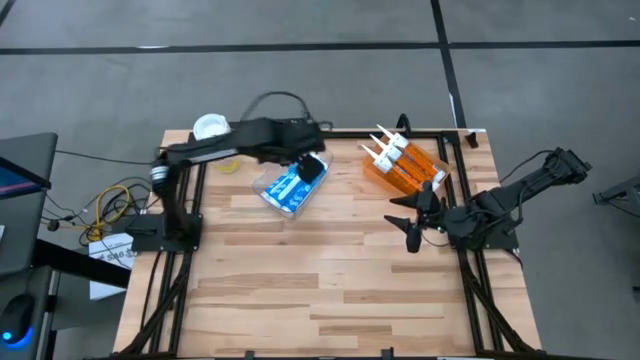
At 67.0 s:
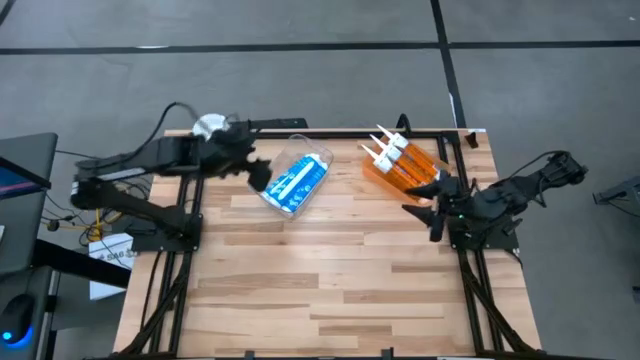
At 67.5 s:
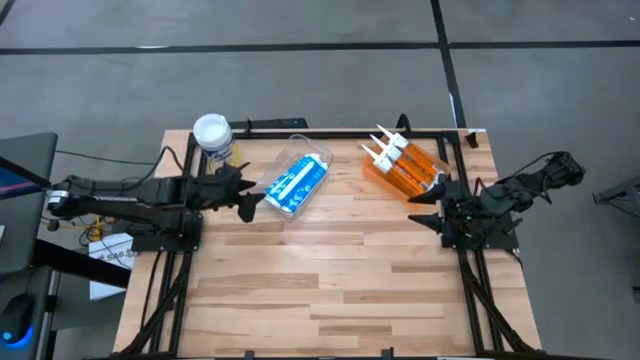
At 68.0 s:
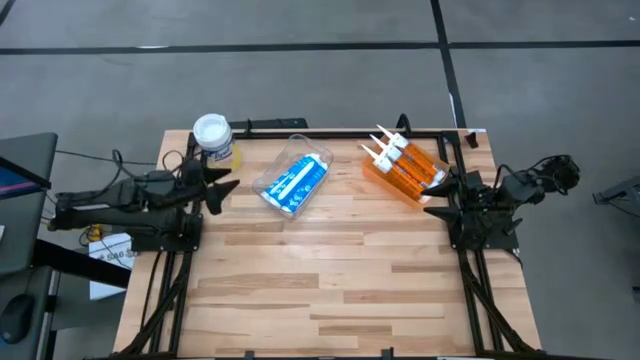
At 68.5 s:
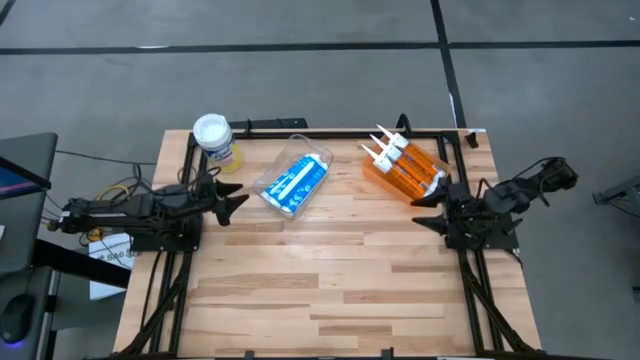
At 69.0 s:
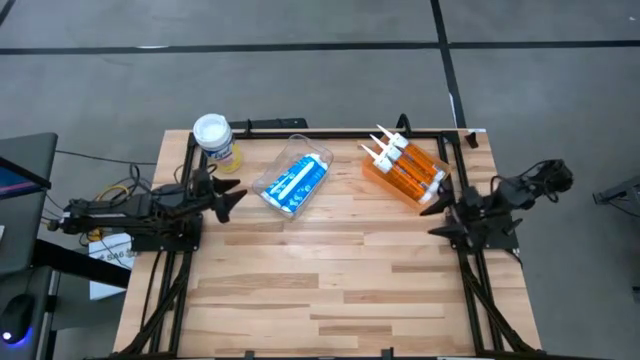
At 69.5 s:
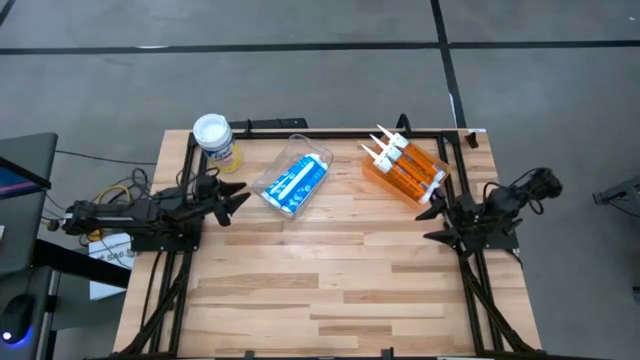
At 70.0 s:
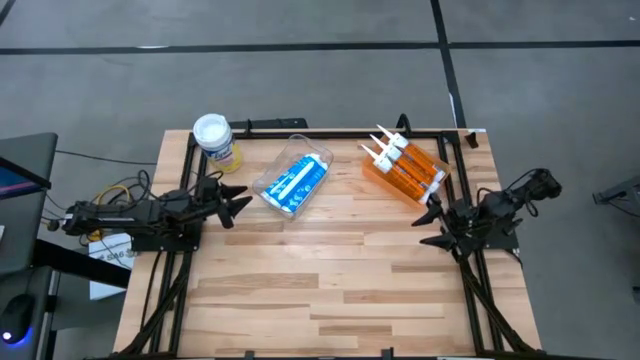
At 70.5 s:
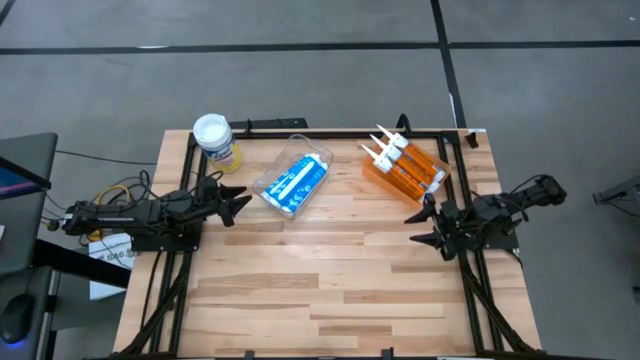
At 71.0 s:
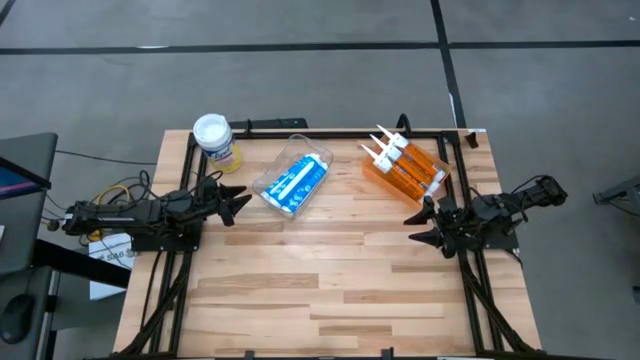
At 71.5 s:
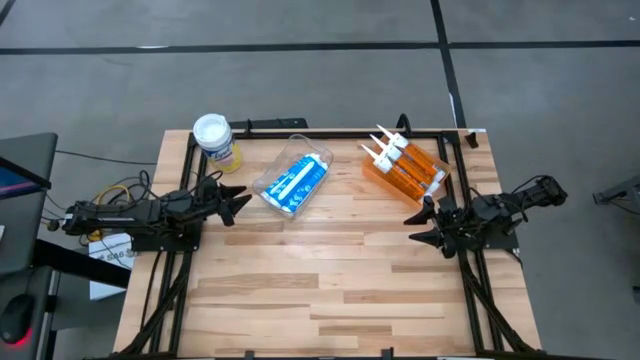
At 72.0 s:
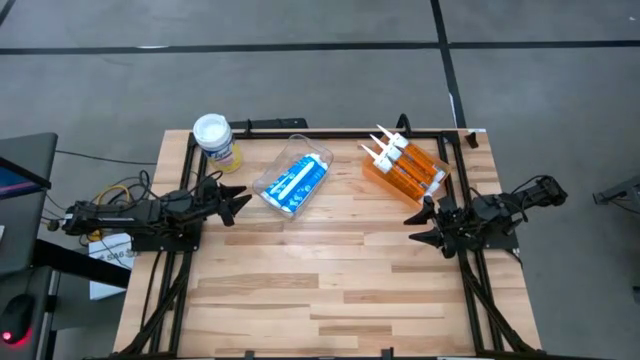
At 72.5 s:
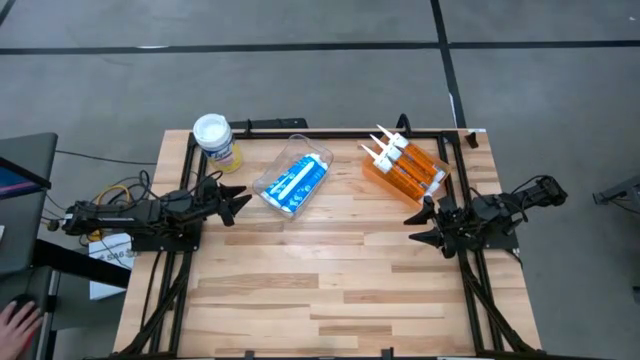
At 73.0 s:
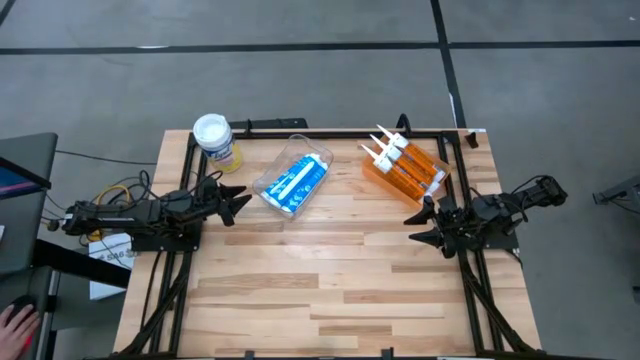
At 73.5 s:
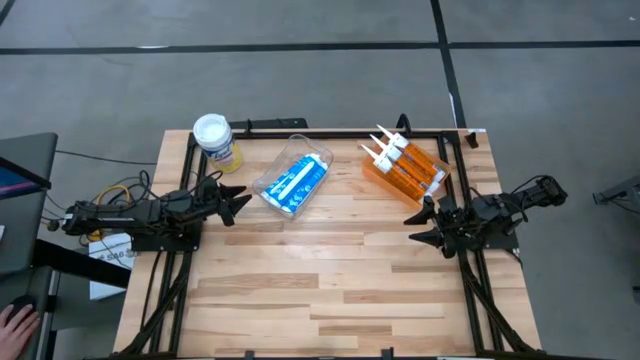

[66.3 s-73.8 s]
Task: Pick & place silicon tubes, Sealant and Lysol wipes
Return to home position

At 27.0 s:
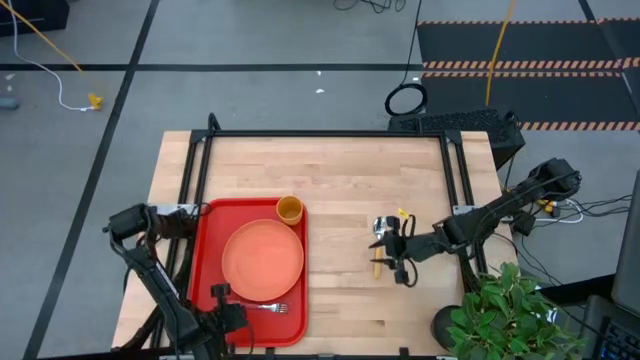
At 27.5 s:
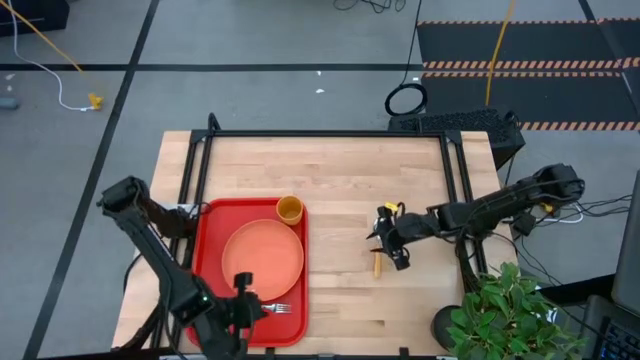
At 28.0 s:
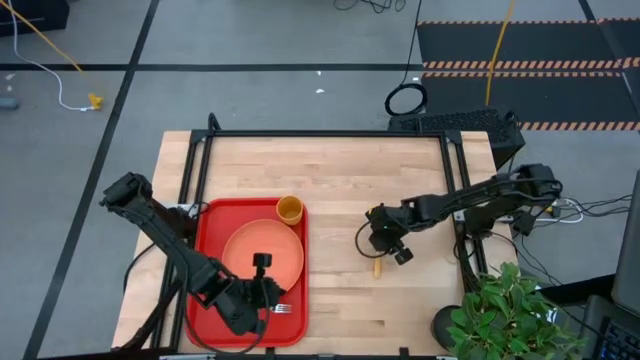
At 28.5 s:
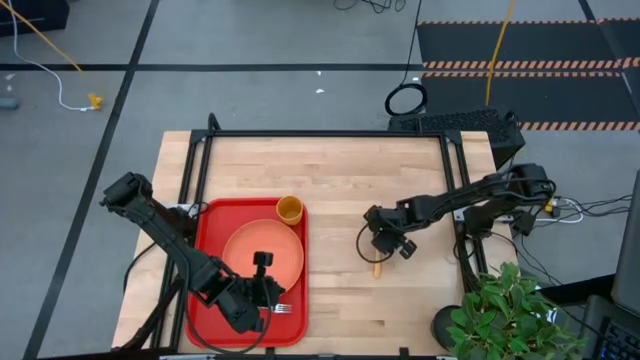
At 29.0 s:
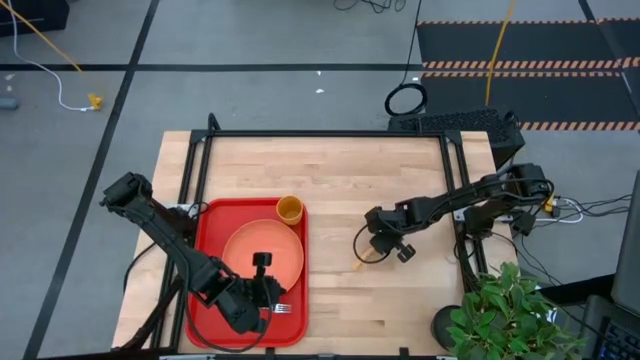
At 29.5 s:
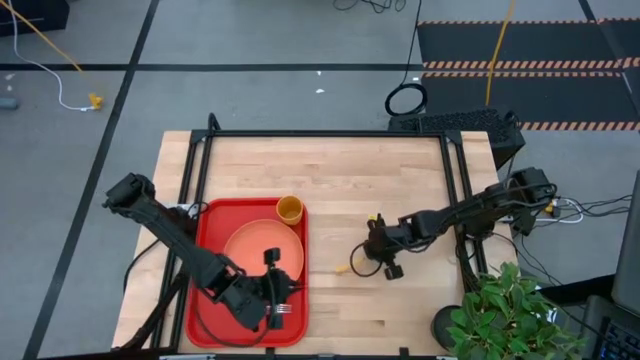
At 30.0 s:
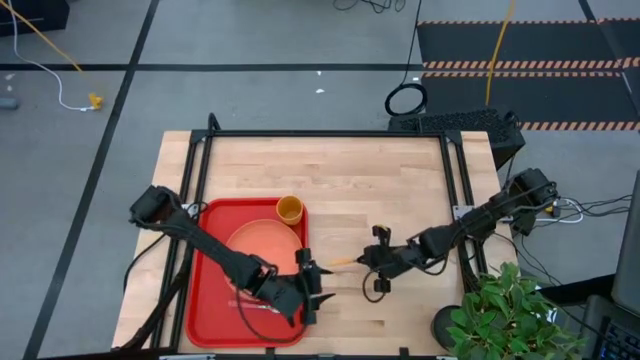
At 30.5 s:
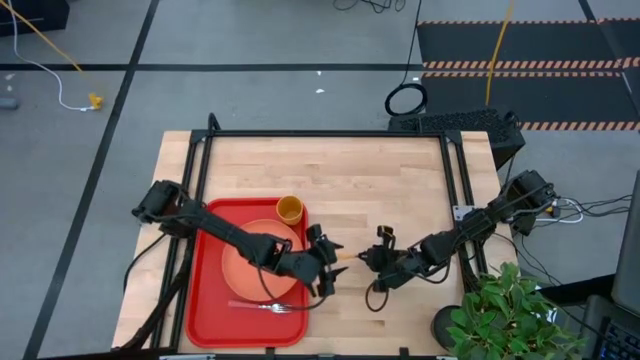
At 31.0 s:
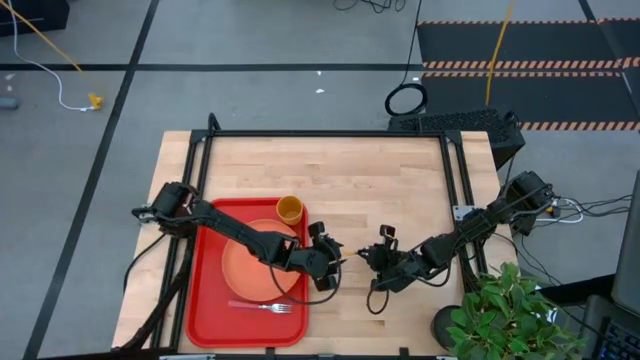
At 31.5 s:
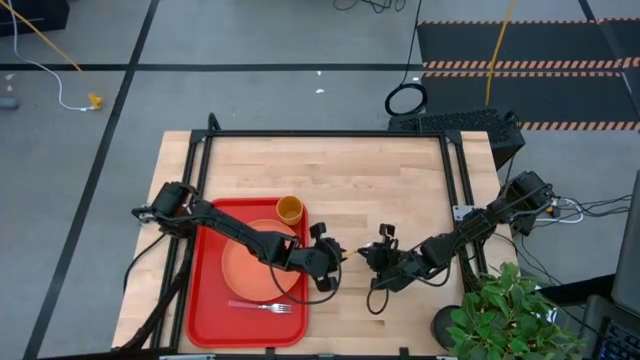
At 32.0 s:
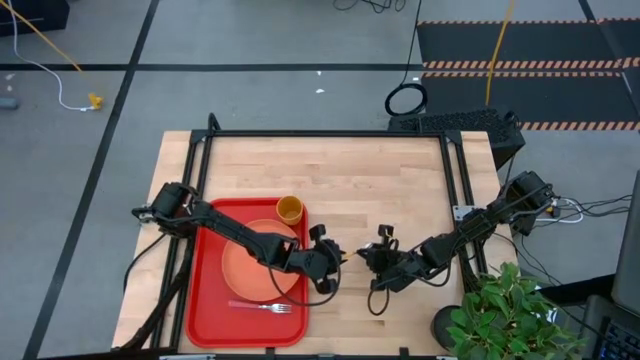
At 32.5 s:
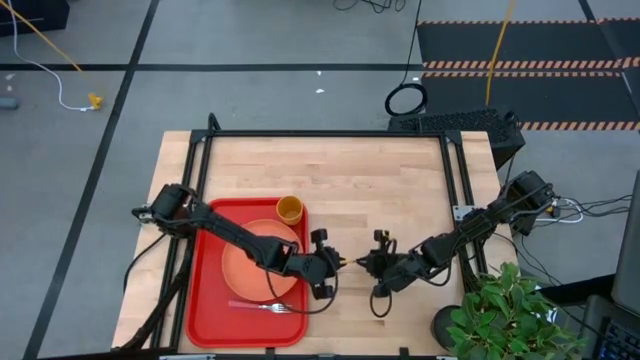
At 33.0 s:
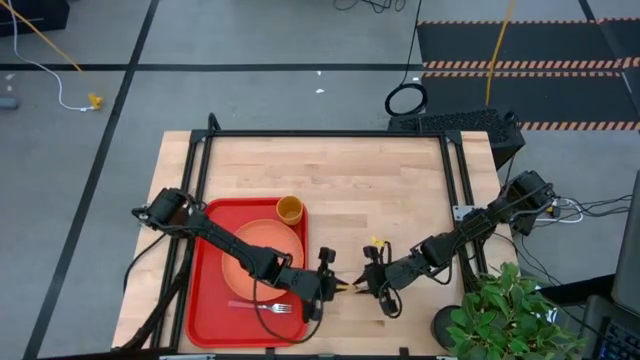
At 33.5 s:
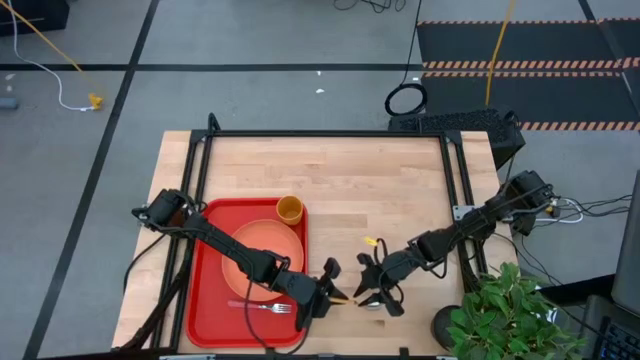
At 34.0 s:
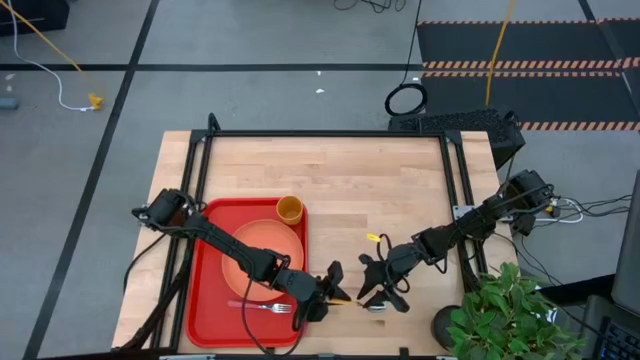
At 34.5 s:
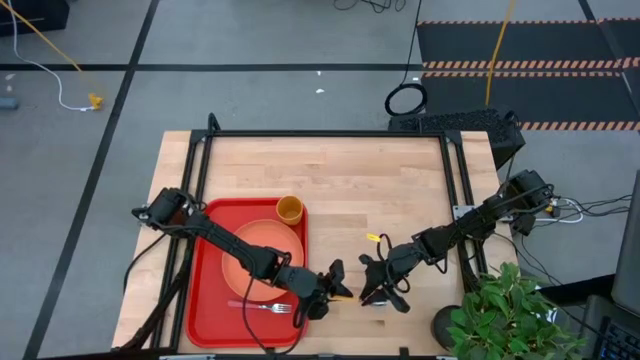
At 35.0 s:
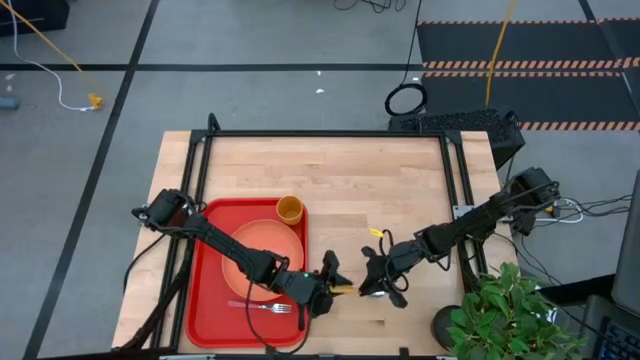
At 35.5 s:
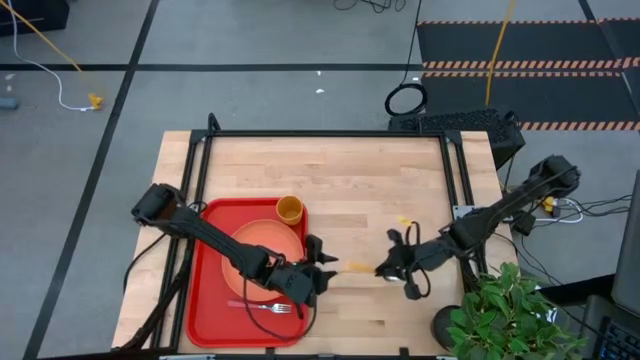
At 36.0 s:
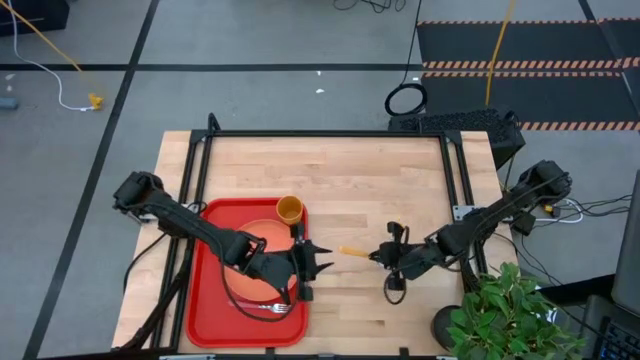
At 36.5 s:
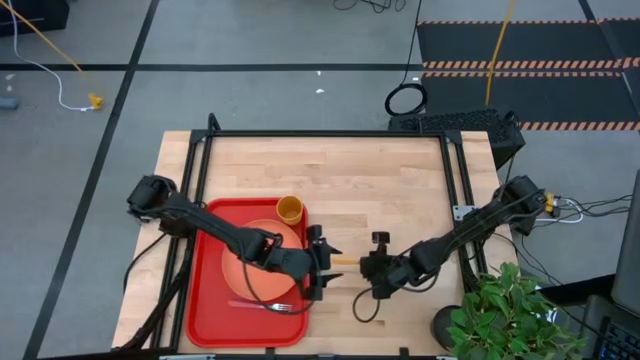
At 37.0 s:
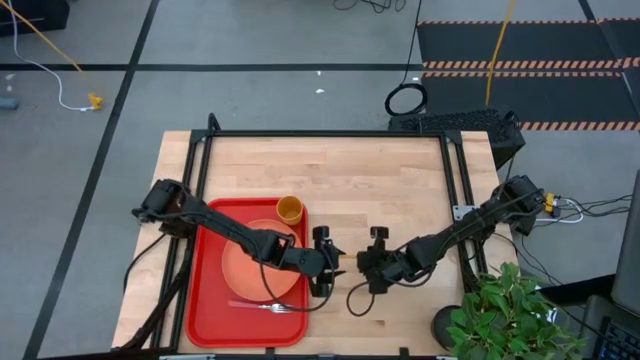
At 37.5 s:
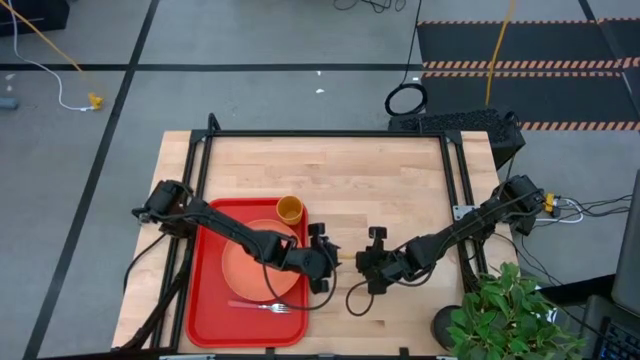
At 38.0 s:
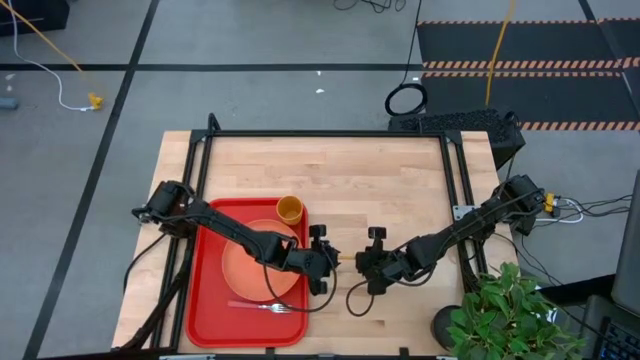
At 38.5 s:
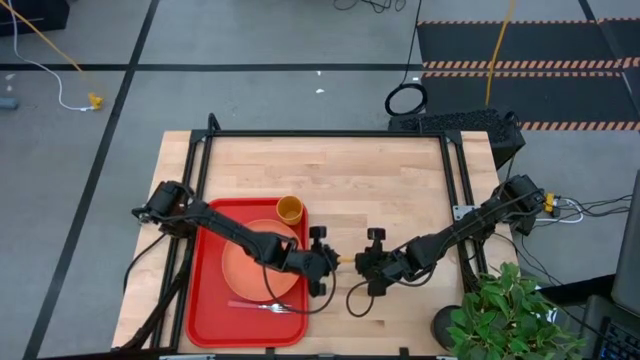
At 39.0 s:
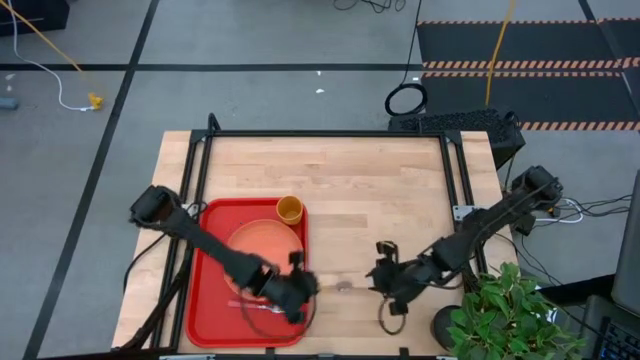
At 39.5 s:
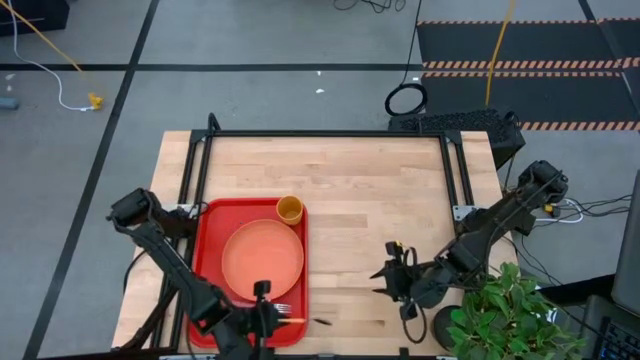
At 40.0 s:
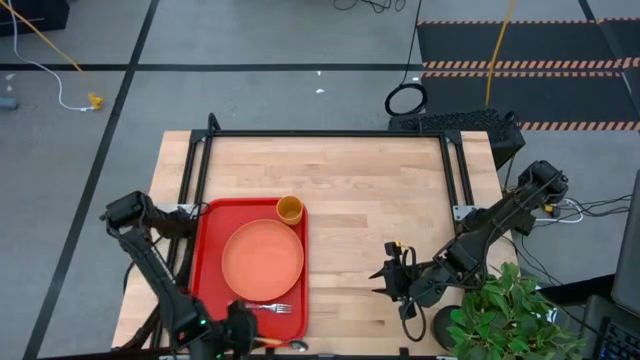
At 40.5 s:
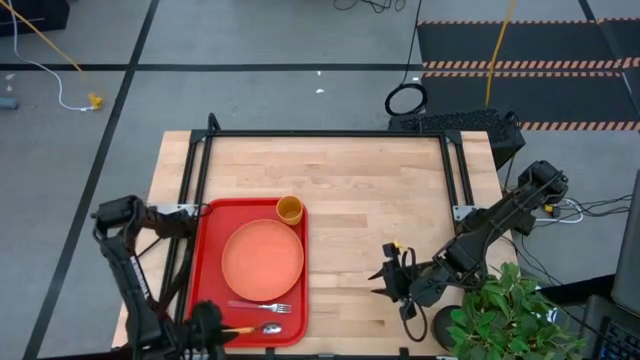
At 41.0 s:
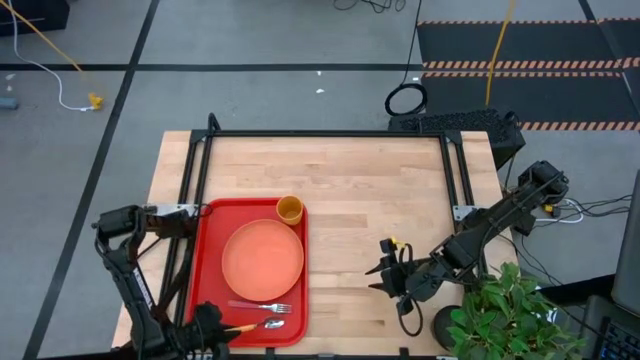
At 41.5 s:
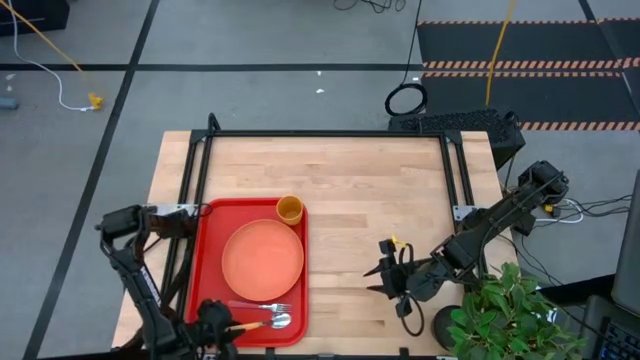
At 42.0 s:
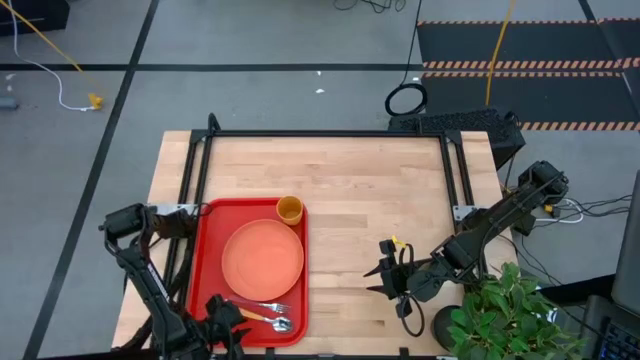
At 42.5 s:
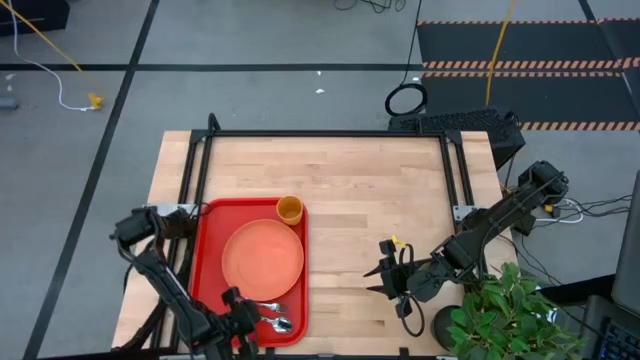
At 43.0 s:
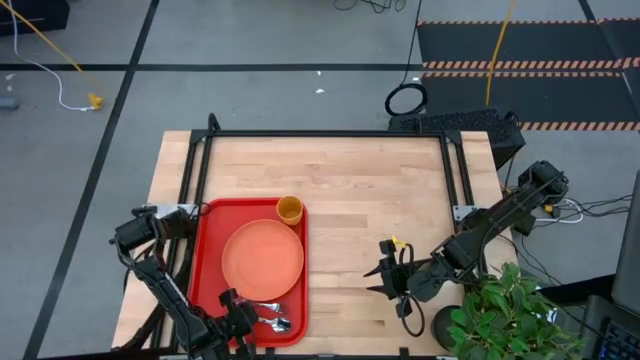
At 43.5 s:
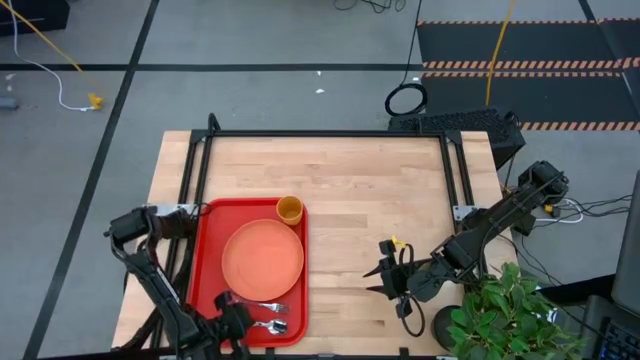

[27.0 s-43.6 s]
Task: Pick and place plate/cup/fork/spoon on tray
Put the yellow spoon on the red tray at the bottom of the pink fork
